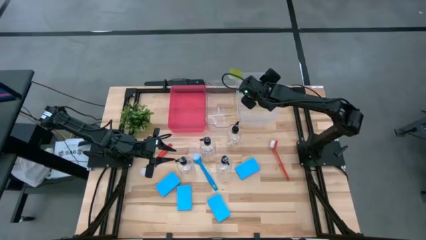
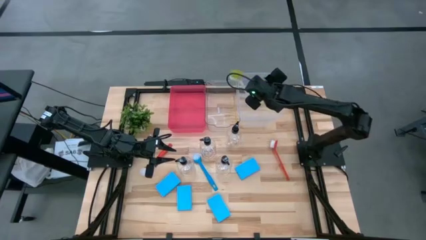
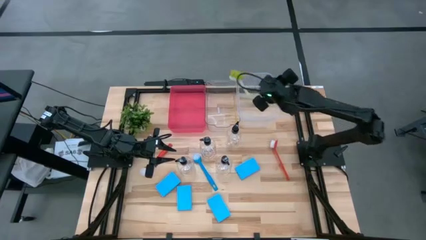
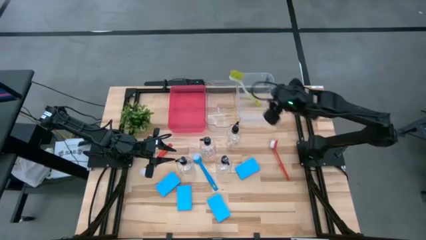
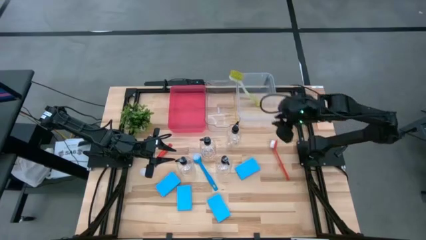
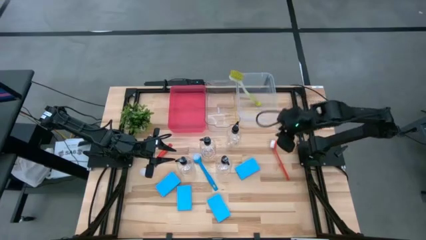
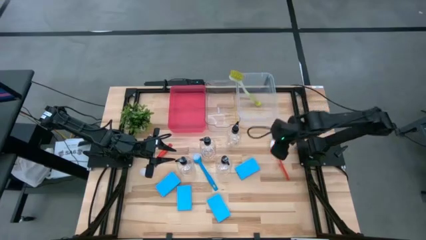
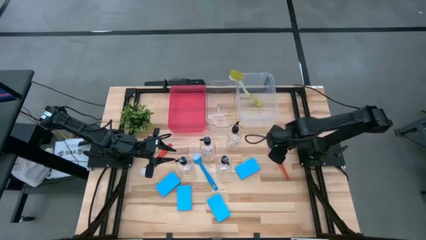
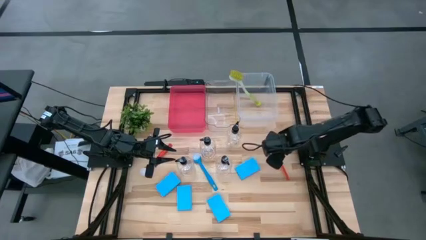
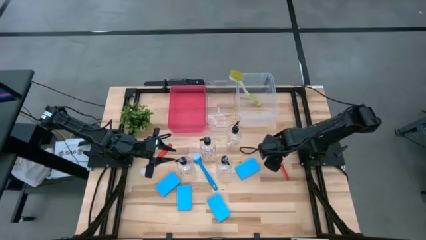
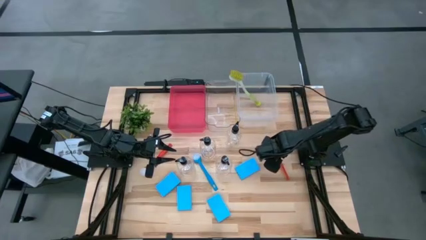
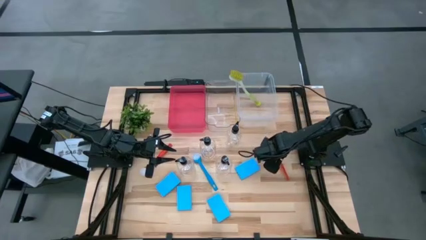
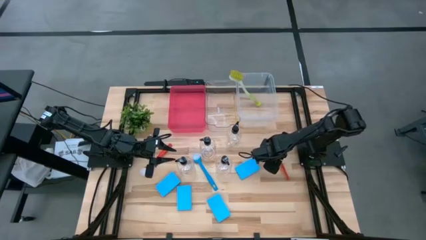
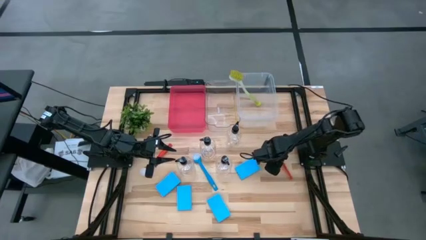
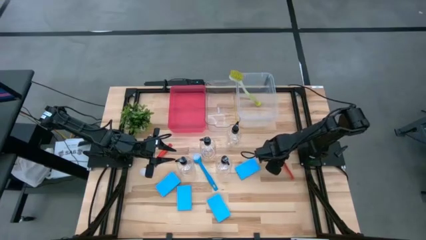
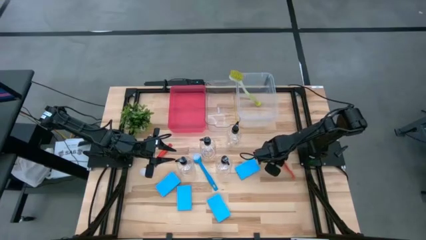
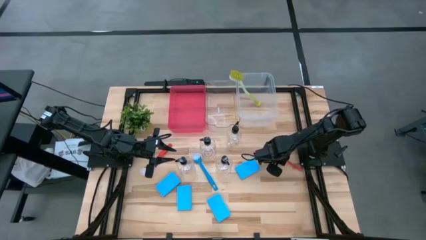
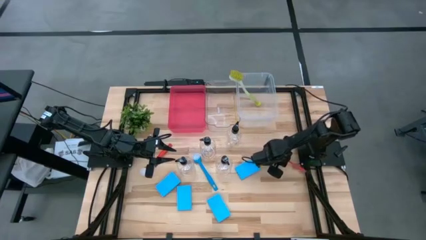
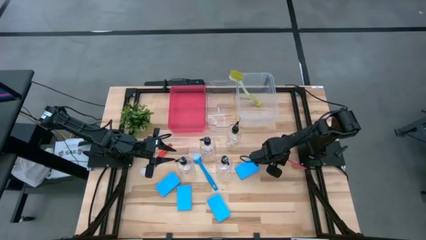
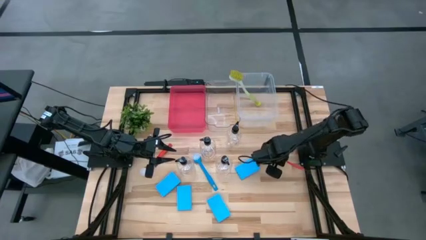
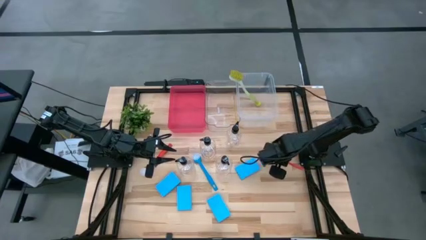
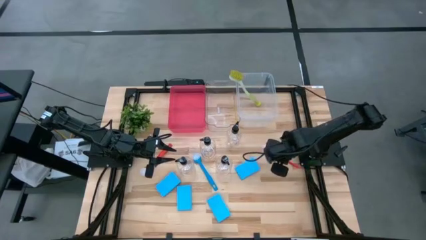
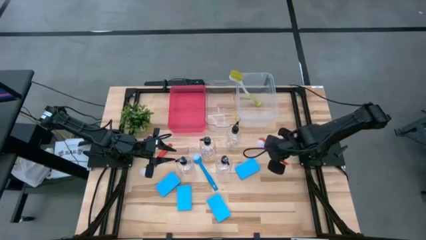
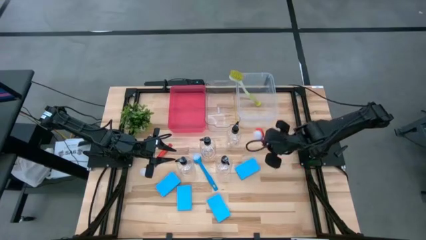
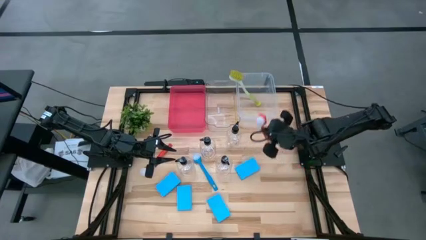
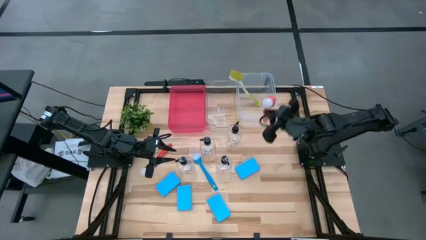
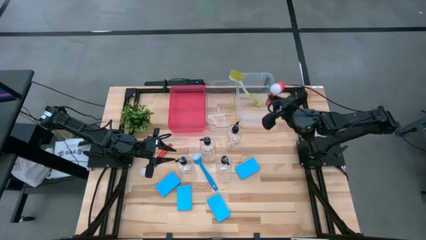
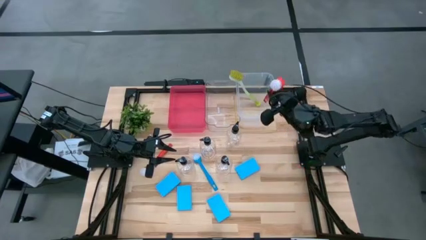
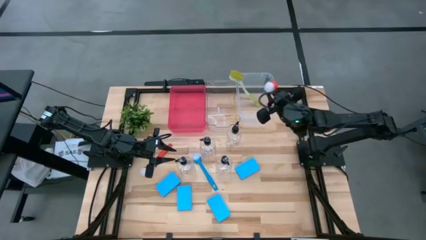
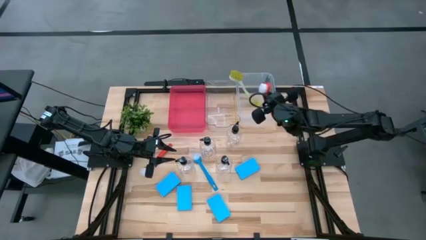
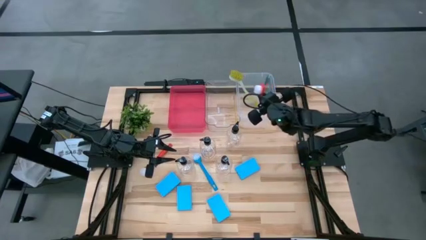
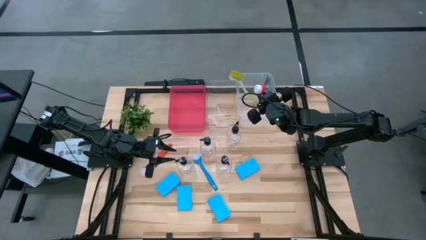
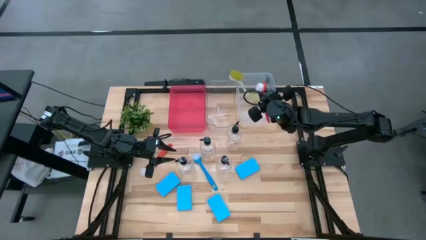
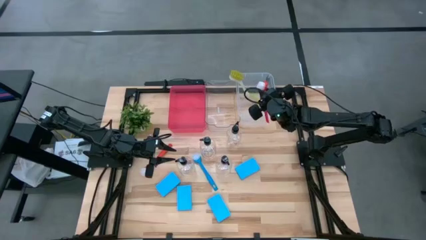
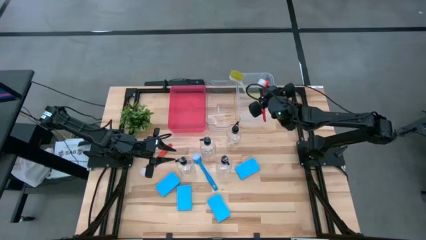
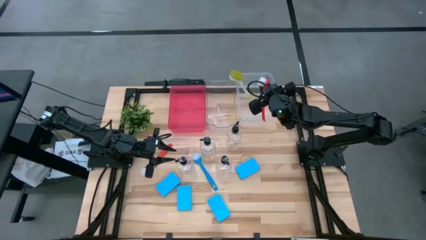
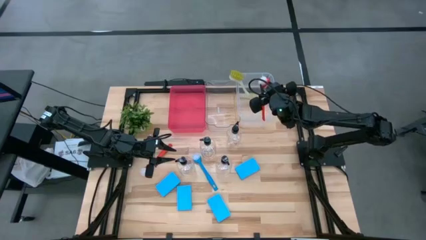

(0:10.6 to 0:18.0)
Task: Pick & Place Kitchen Sink Supplies
Put the orange kitchen brush into the white bin

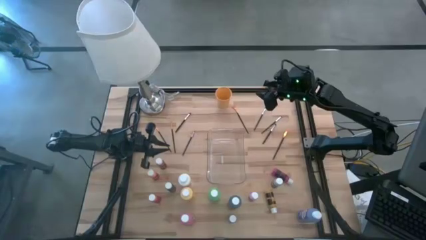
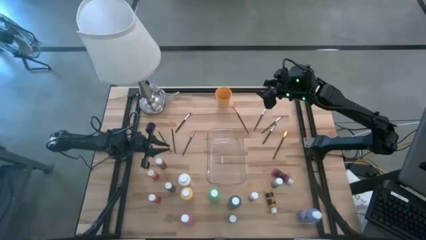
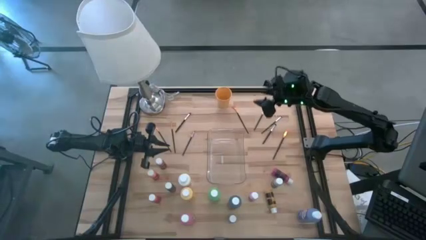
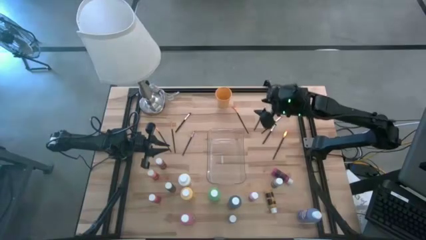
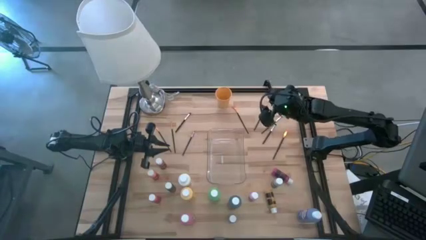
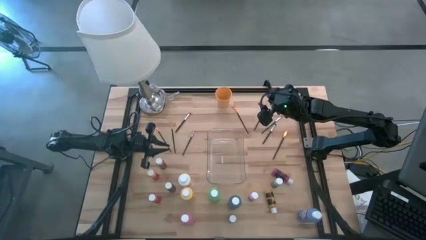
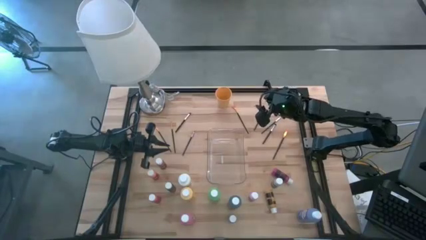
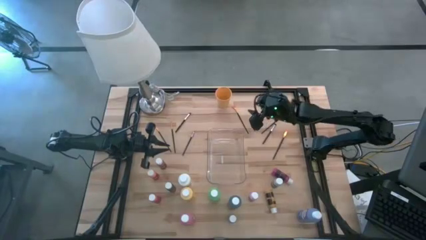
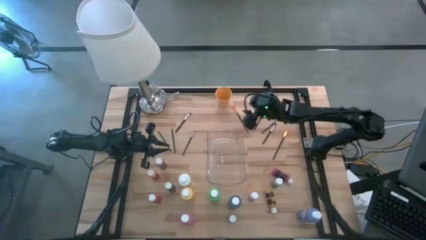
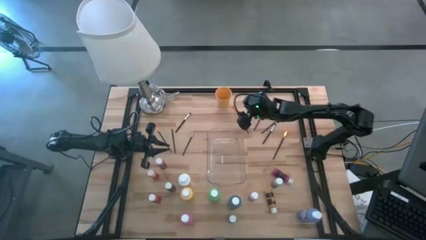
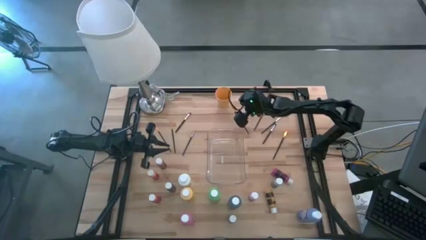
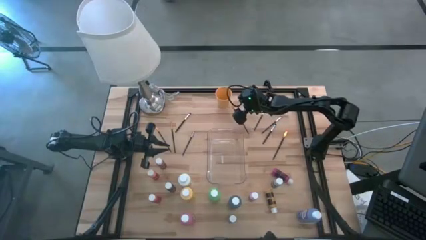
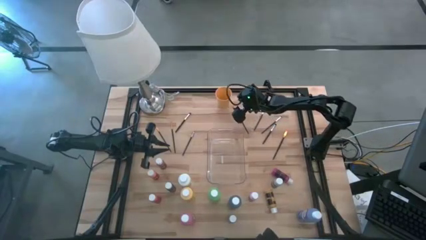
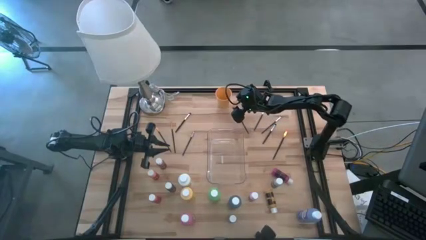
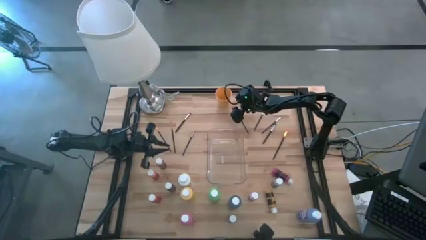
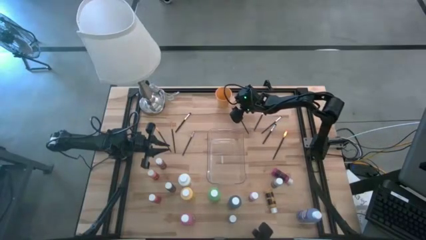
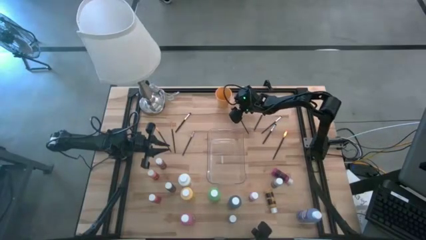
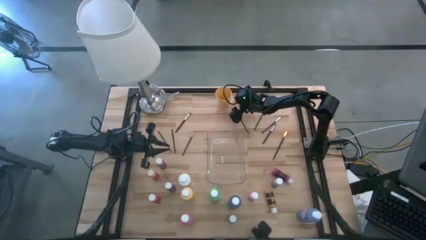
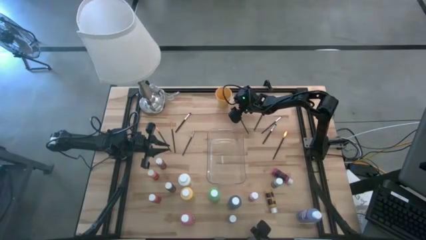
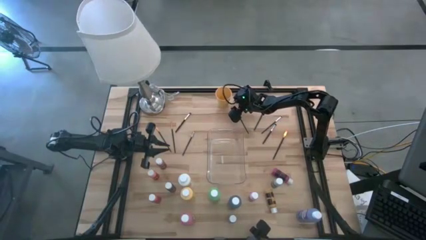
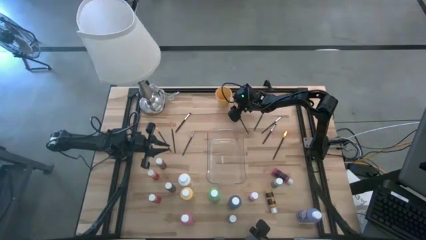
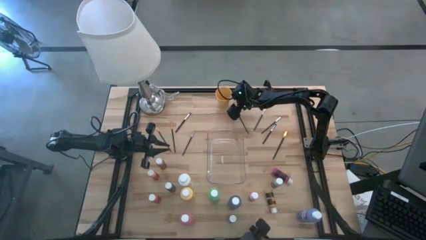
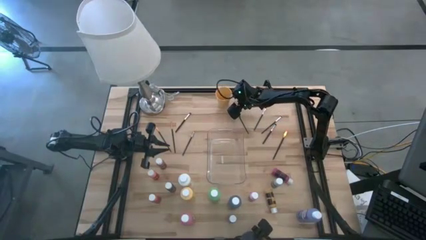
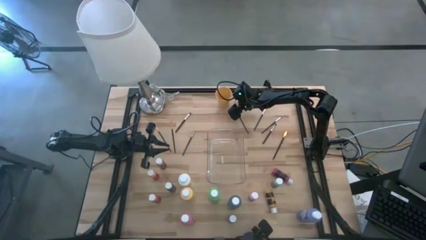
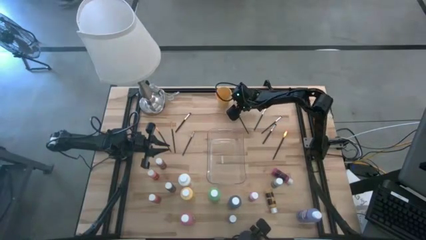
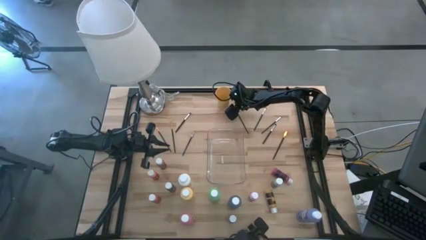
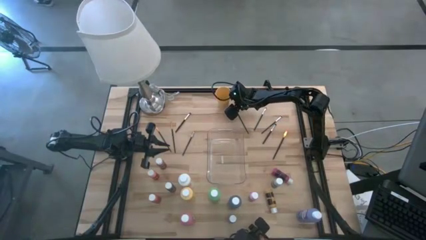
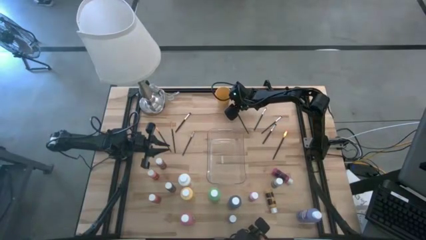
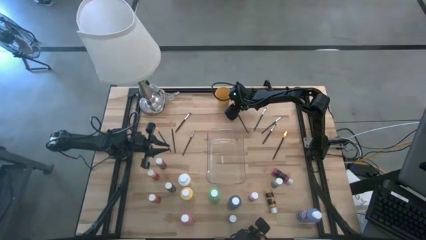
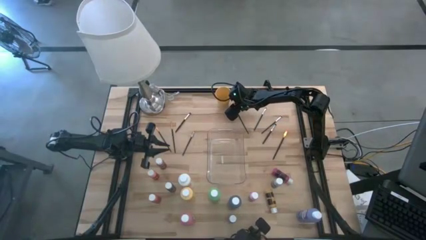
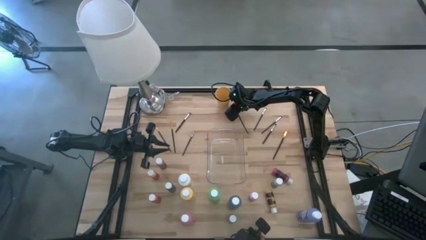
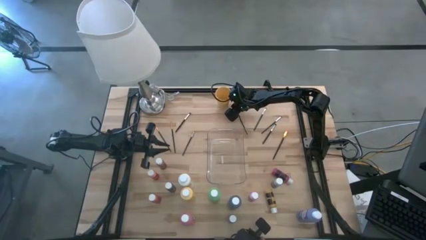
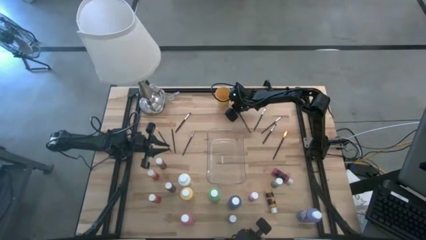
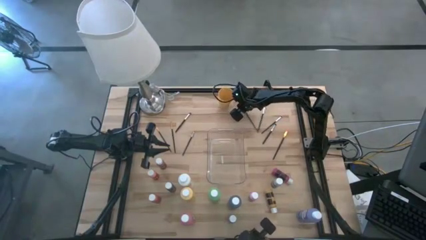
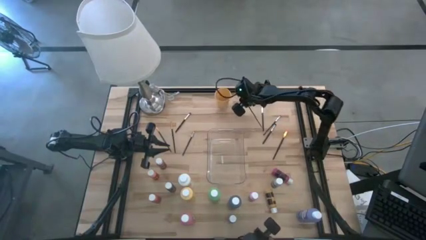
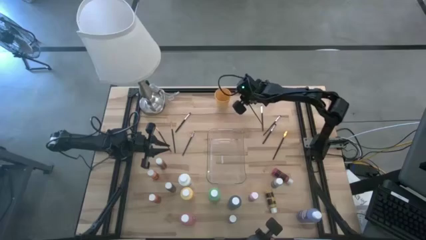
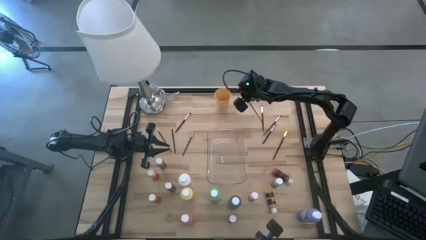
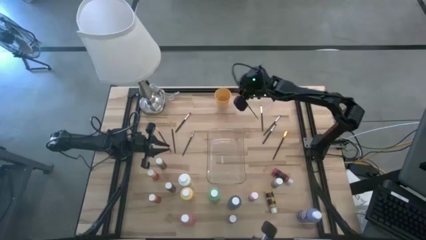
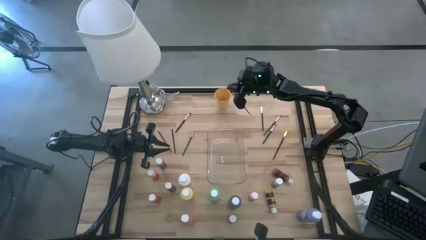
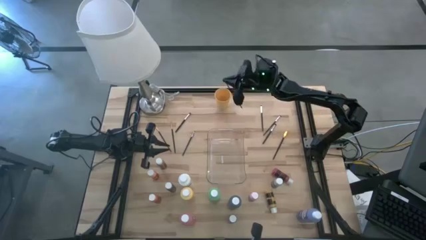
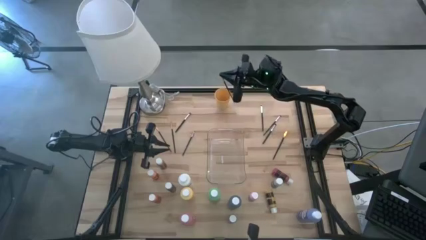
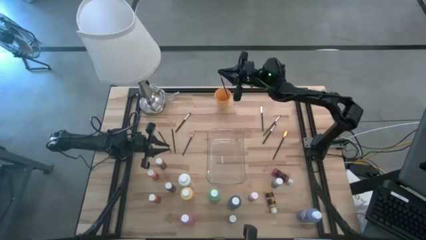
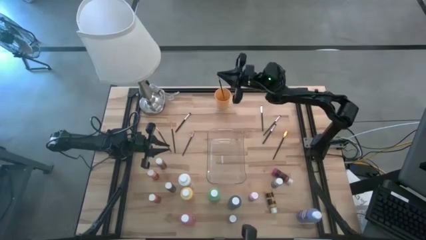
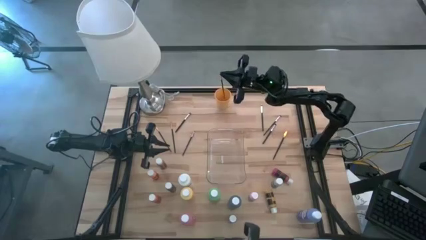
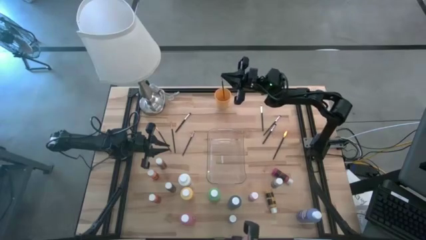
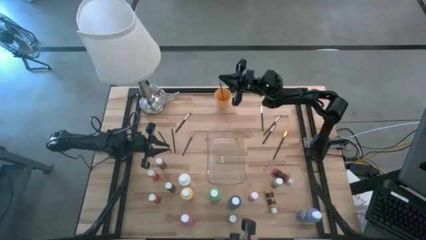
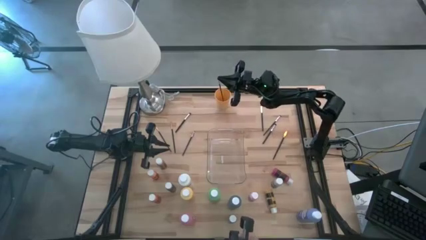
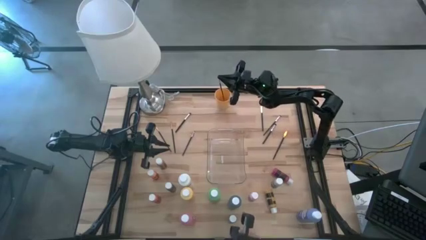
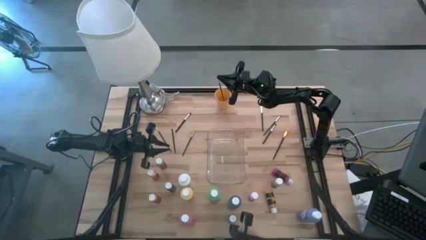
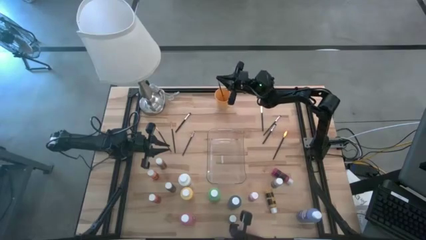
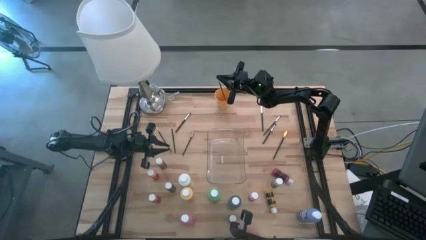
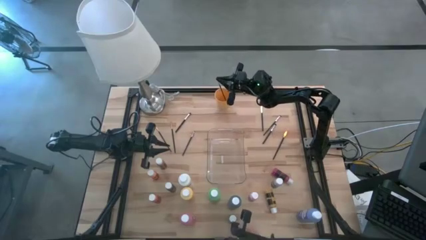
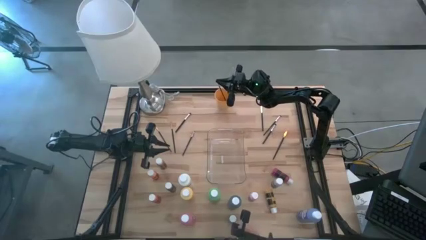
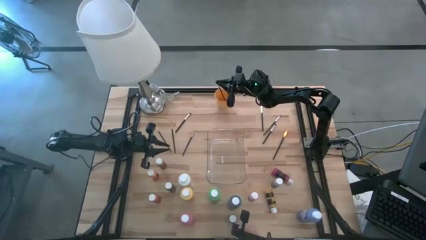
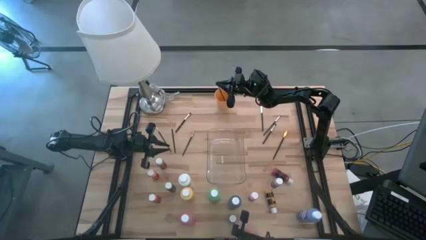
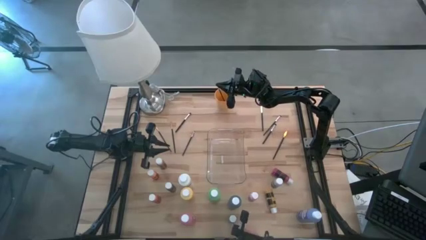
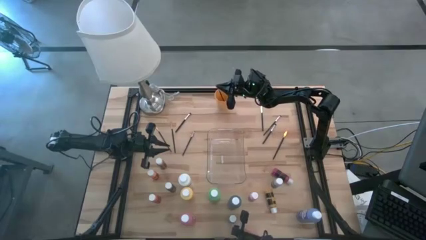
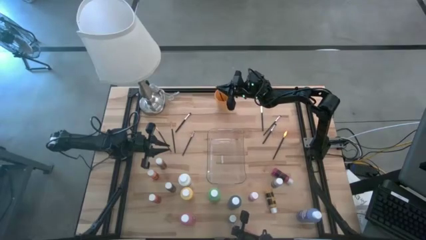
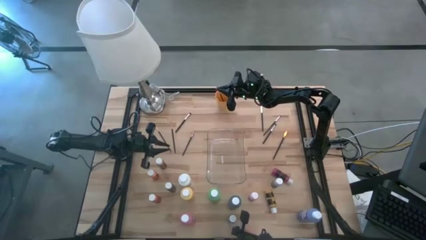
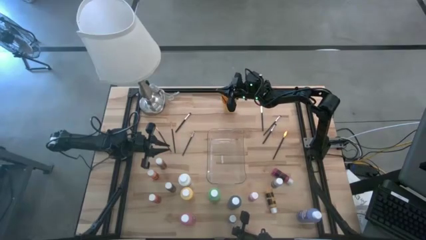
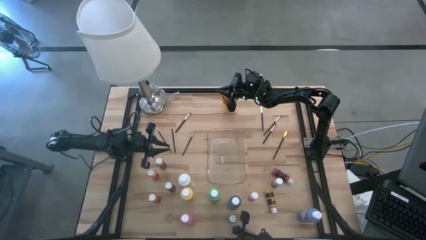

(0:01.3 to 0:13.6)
Task: Pick & Place Paint Supplies
Put the gold paint brush into the yellow cup
